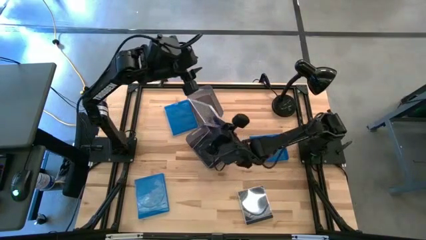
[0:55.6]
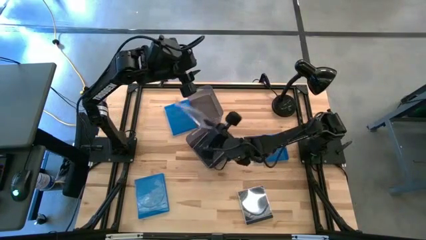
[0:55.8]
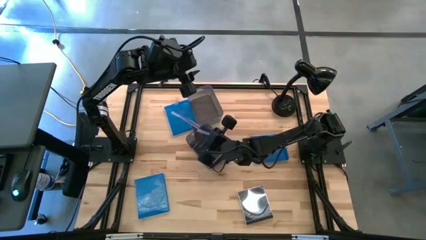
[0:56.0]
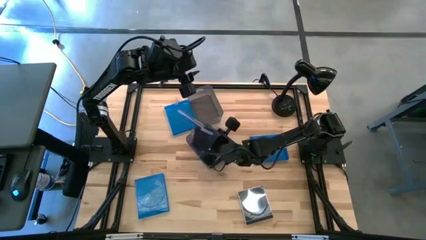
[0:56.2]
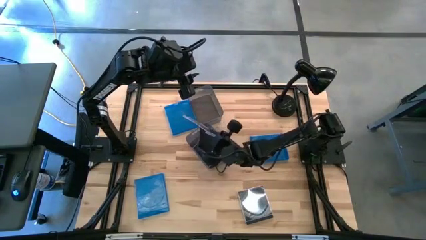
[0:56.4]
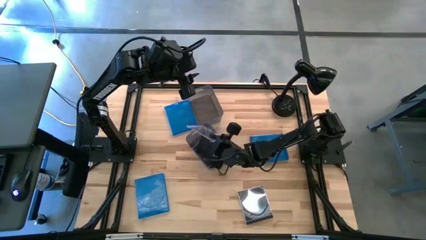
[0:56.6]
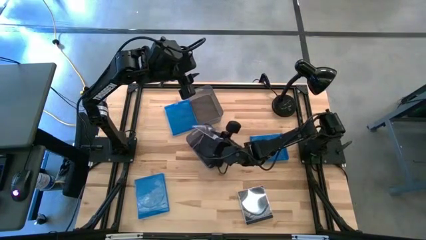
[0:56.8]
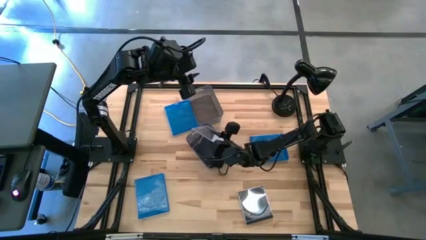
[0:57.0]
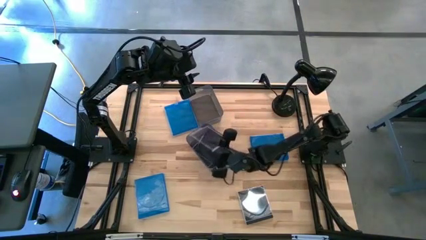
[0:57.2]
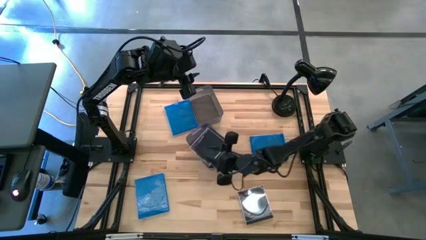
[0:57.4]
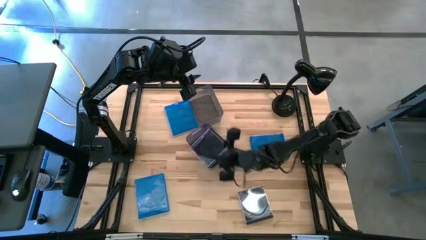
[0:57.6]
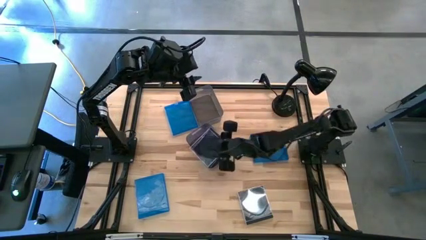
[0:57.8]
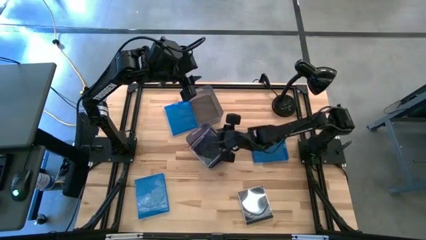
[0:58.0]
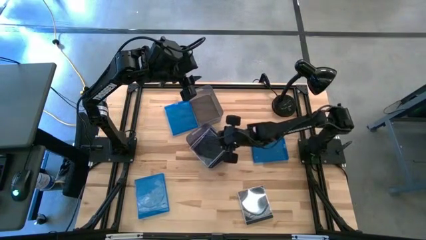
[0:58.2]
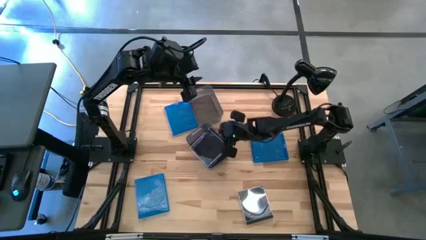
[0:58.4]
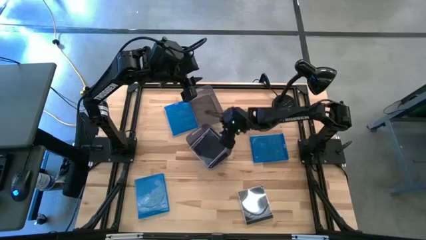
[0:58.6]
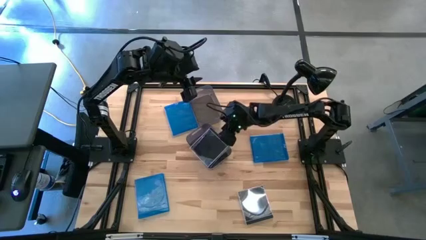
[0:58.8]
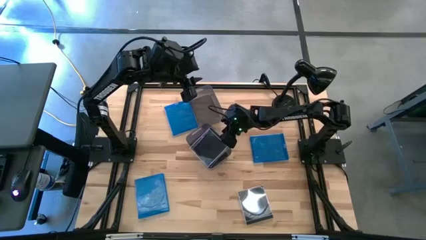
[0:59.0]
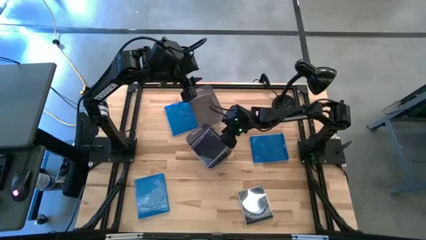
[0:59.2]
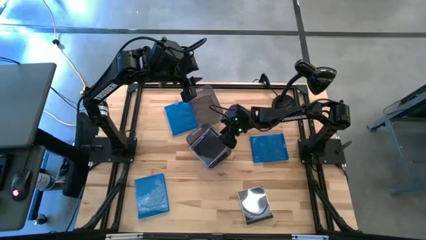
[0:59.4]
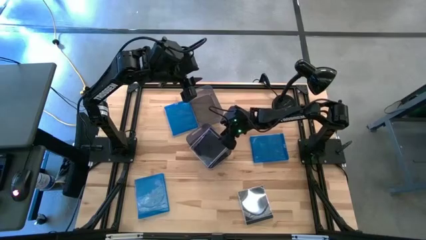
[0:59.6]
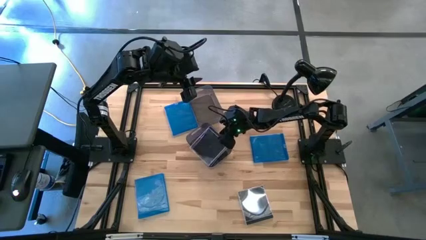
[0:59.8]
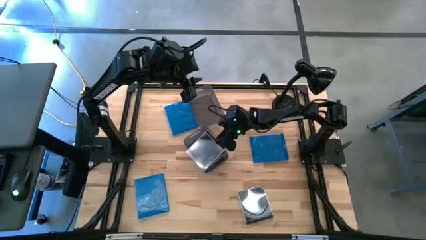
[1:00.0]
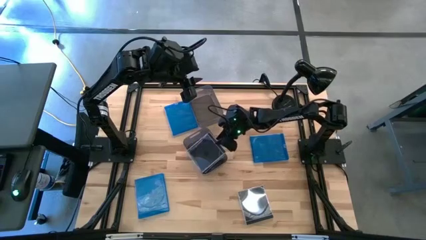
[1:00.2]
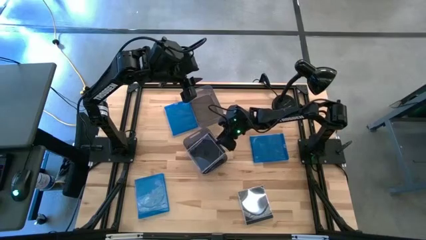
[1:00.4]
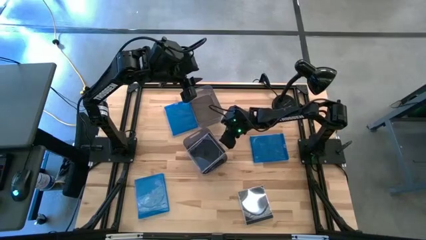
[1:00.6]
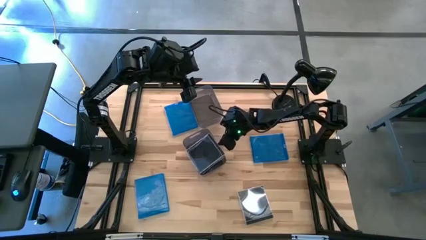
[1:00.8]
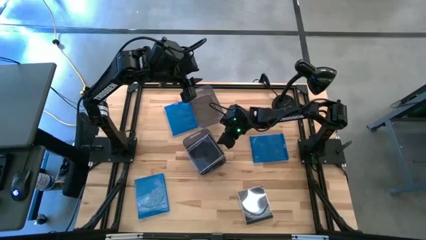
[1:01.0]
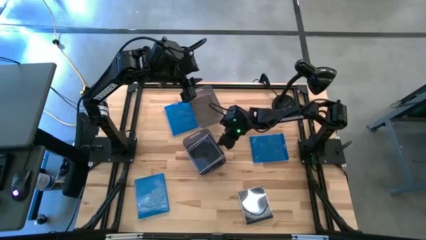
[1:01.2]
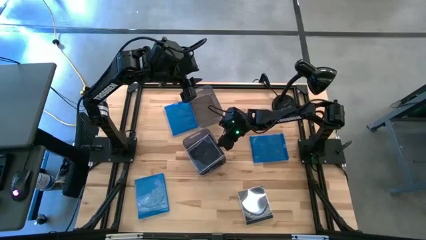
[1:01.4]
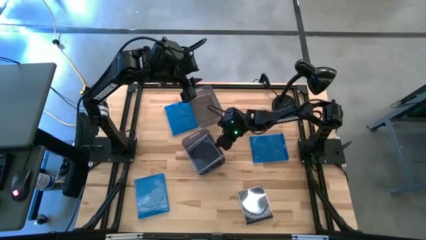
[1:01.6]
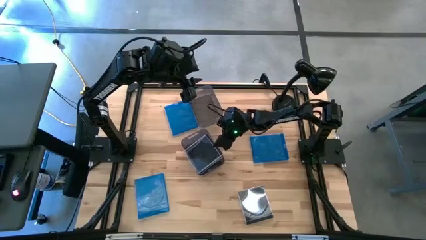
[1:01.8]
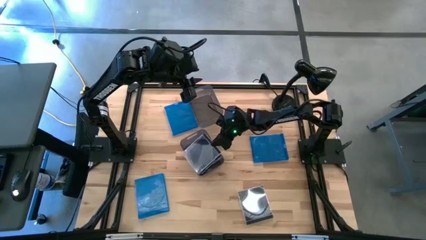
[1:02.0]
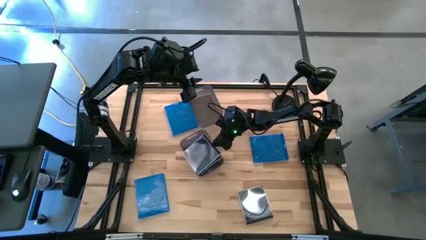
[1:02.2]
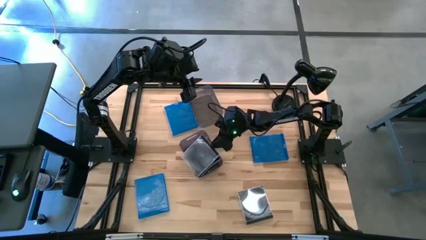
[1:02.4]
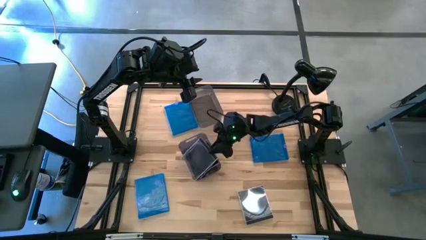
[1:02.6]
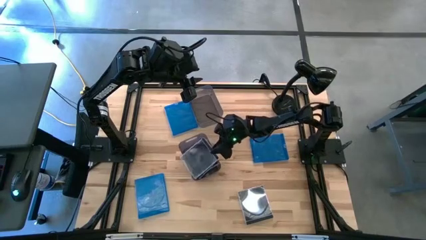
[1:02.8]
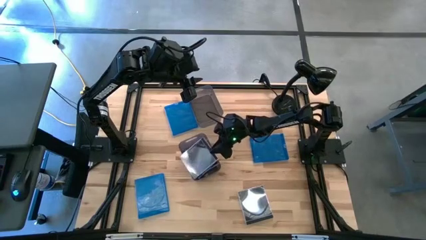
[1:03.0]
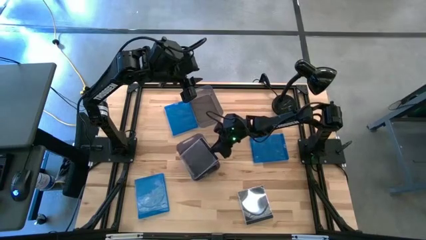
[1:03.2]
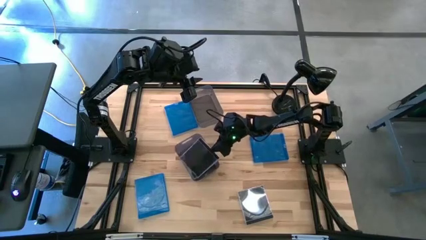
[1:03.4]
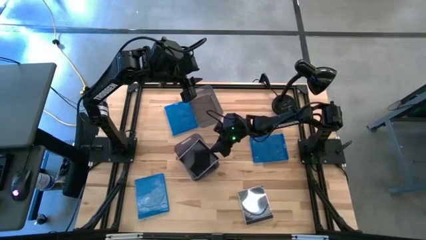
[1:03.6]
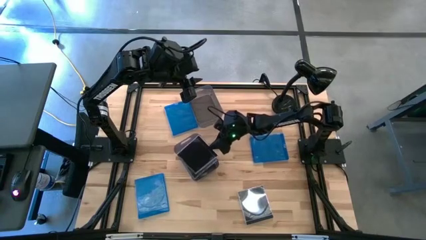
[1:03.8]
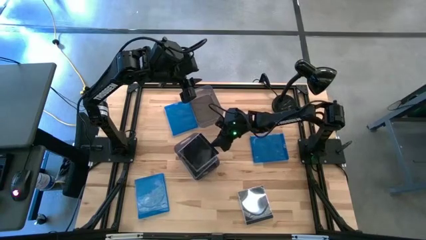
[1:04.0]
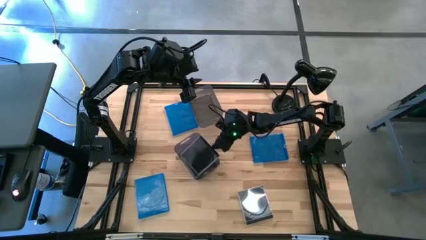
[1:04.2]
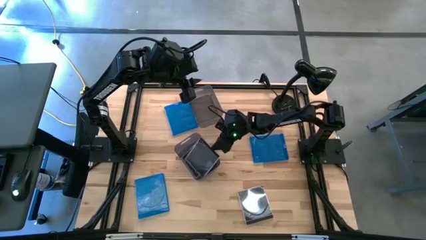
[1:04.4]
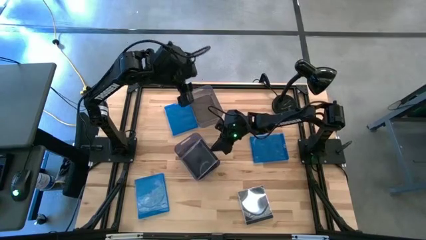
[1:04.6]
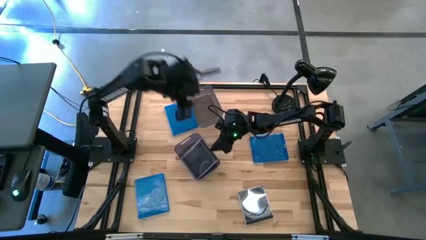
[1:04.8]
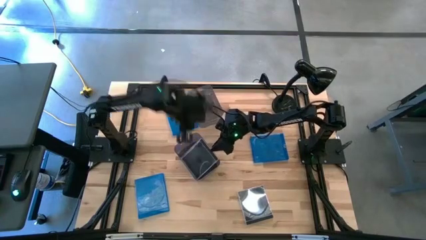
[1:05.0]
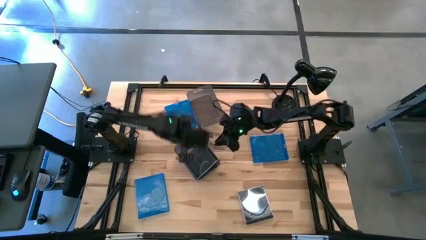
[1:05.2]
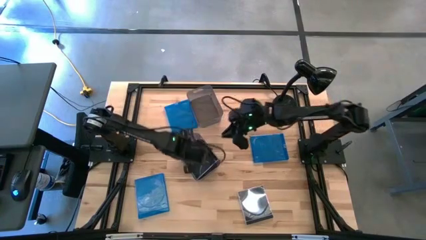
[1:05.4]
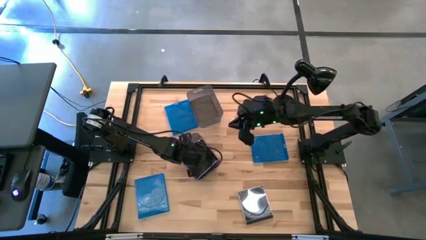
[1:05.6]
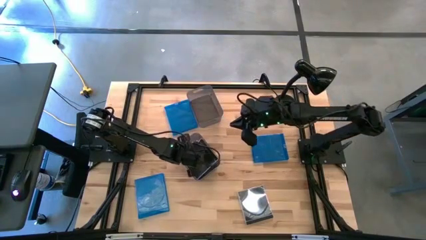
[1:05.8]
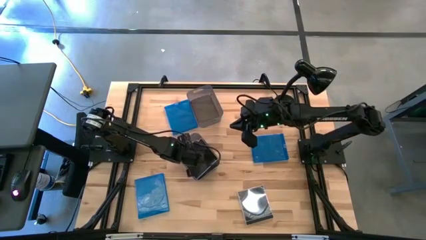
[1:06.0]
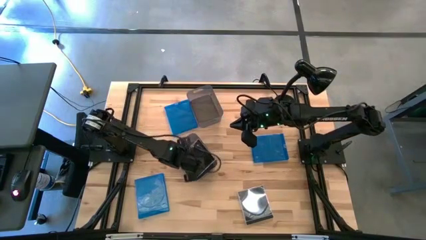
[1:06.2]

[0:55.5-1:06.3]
Task: Pick & place jewel cases by type
Put the left black CD case into the bottom black bin

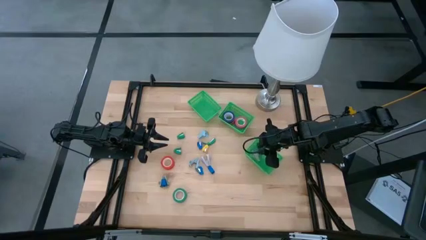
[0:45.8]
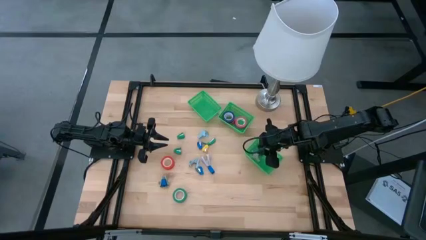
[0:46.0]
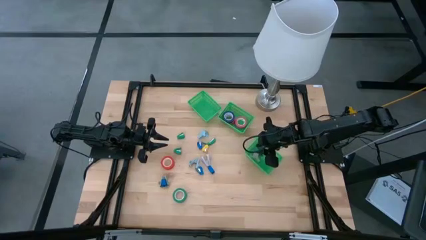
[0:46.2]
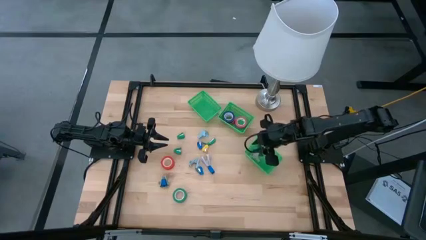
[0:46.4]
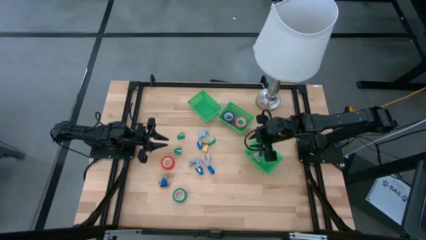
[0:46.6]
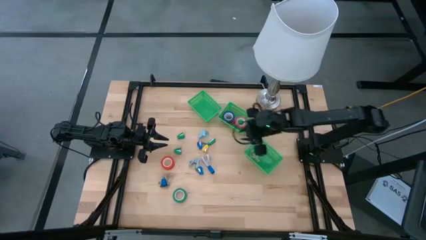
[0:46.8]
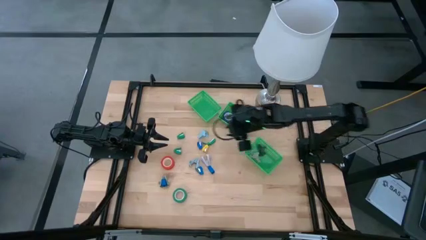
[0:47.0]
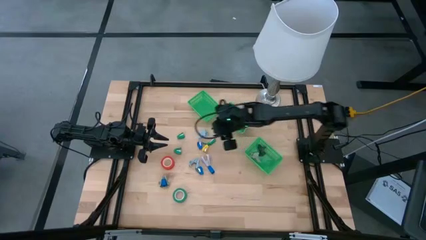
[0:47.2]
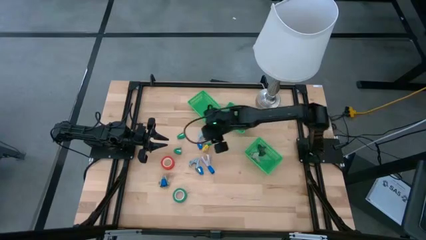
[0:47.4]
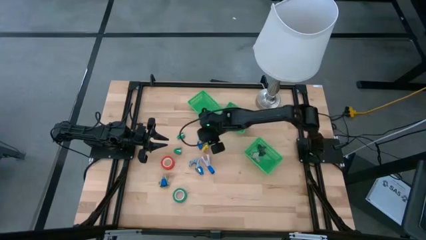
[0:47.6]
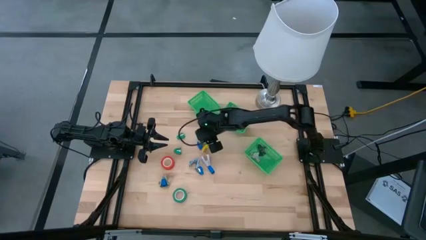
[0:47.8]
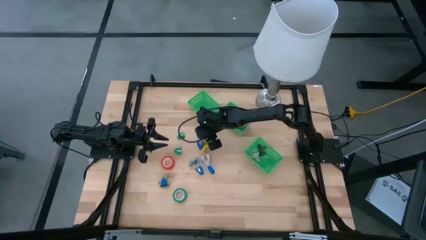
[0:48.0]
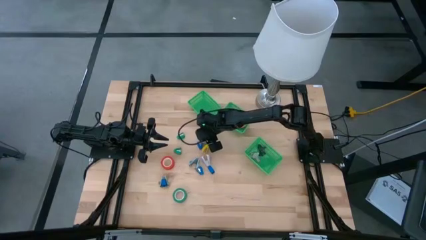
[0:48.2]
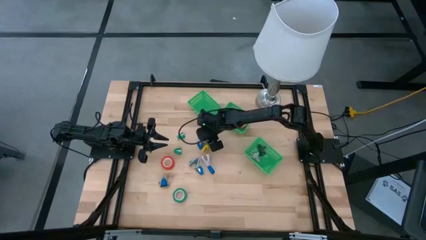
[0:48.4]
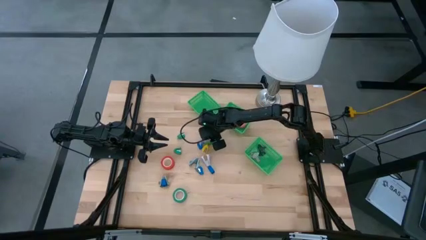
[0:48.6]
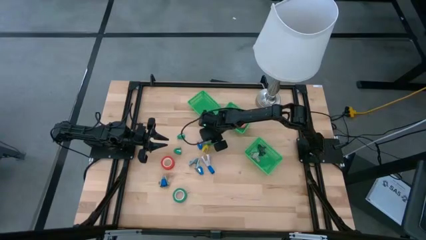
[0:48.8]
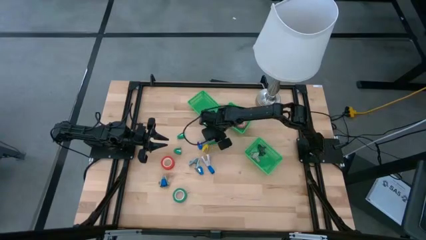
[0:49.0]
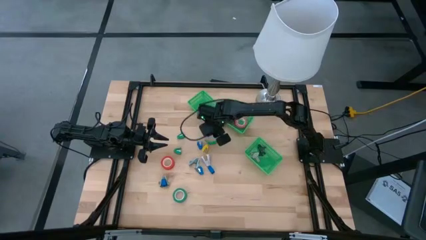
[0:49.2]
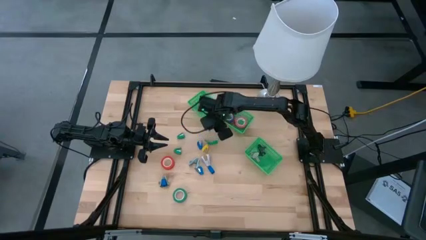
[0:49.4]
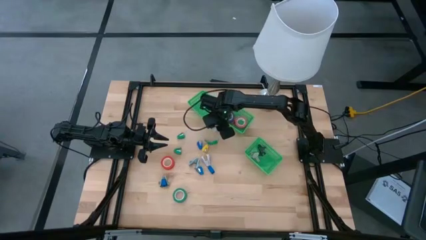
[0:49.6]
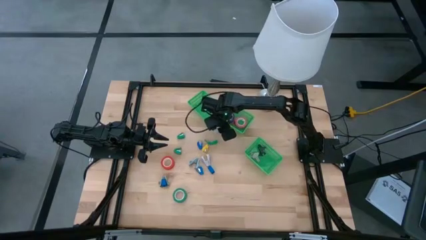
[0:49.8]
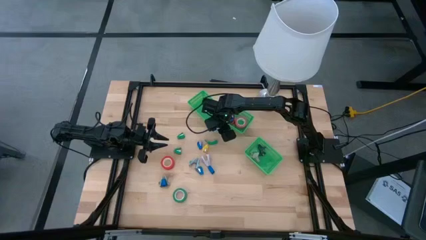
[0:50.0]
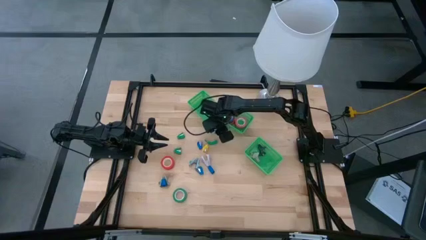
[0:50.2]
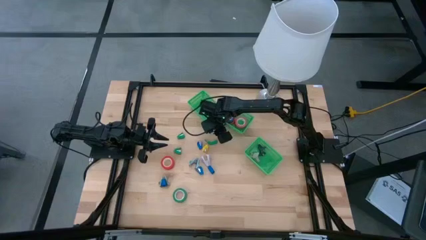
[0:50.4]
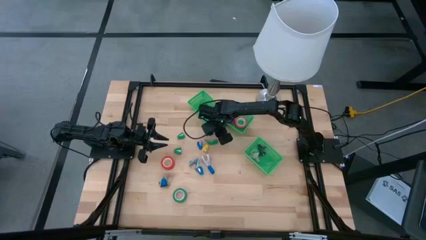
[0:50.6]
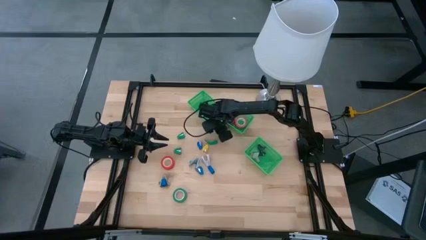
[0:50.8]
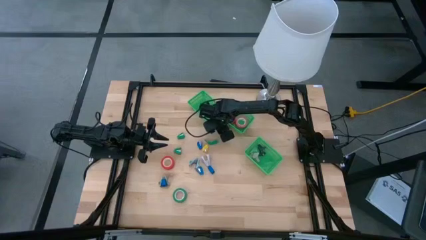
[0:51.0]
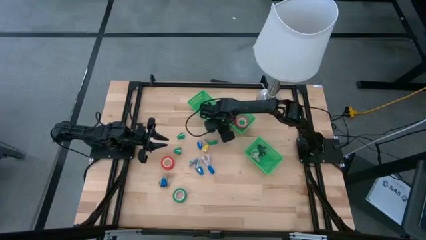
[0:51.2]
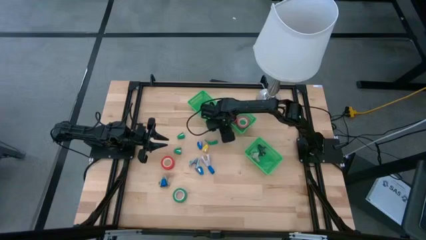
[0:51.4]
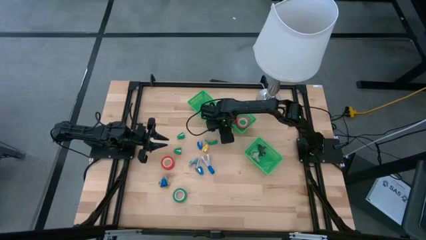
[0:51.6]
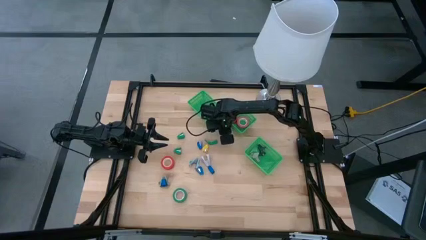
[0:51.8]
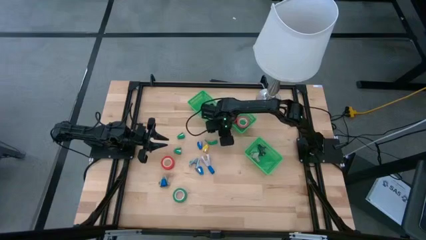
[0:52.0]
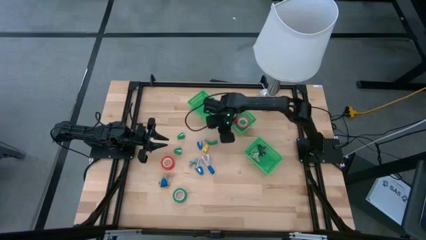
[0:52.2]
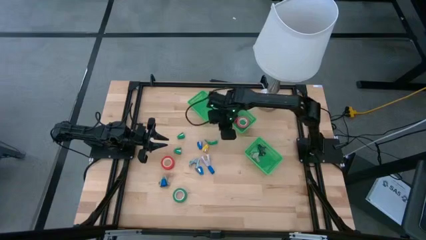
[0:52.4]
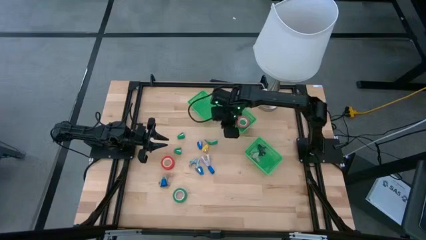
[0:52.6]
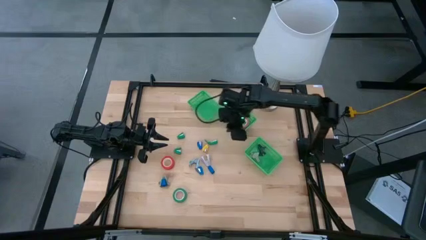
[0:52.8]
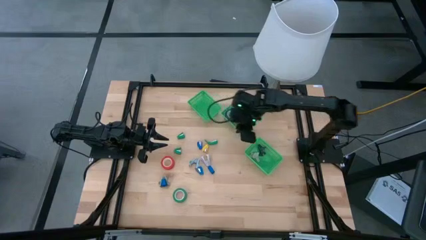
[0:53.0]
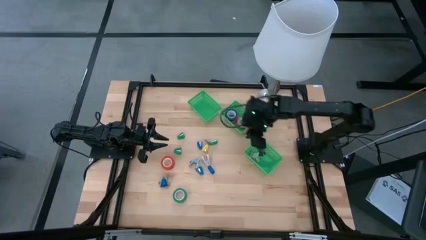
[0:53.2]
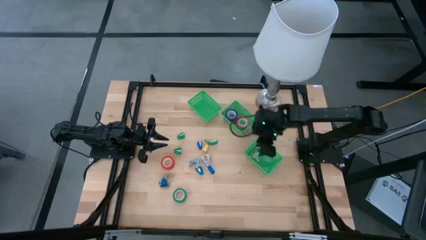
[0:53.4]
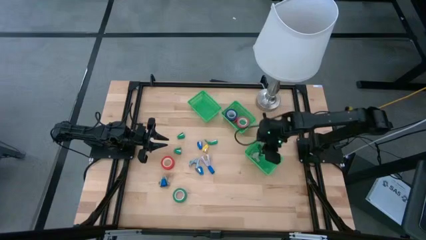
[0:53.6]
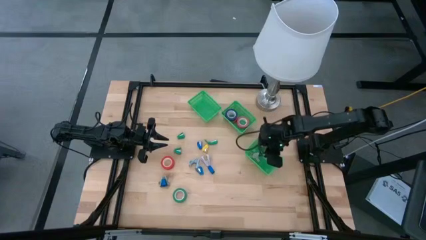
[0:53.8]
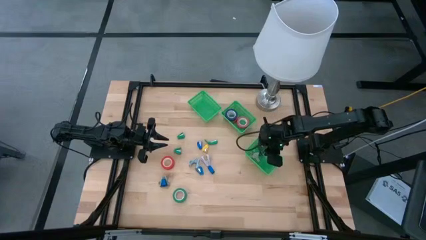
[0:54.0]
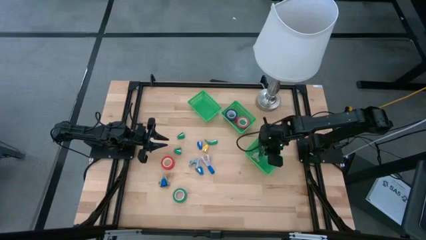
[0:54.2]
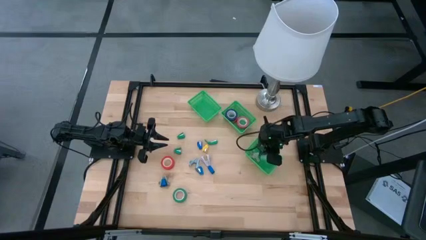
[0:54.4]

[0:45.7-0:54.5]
Task: Pick and place Stapler, Stapler remover, tape
Put the top light blue staple remover into the bottom basket
